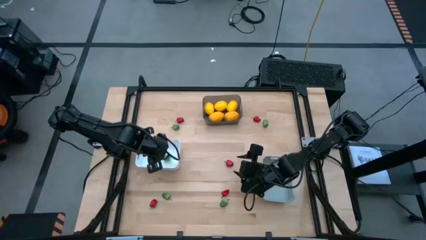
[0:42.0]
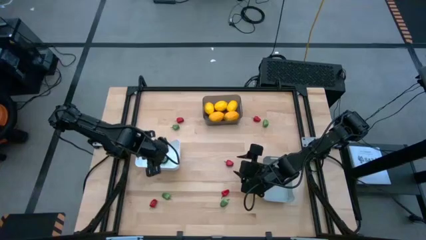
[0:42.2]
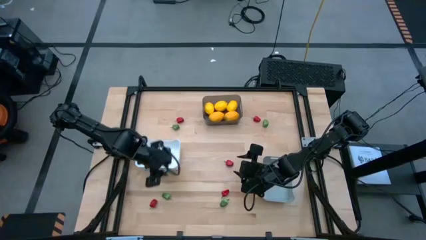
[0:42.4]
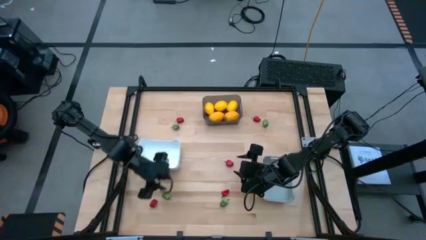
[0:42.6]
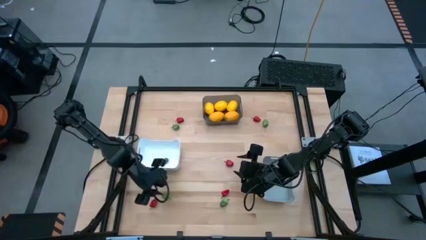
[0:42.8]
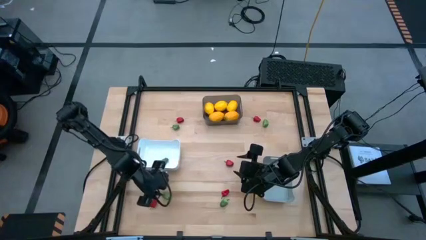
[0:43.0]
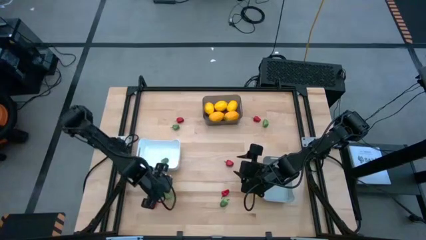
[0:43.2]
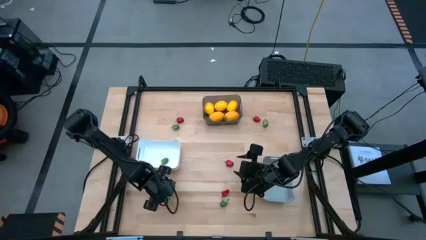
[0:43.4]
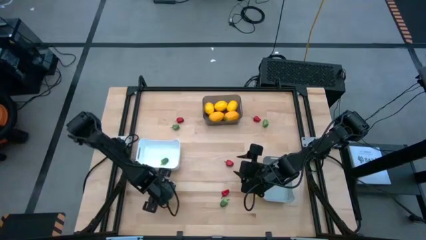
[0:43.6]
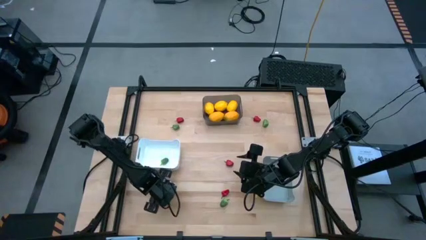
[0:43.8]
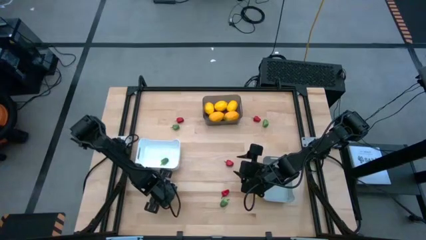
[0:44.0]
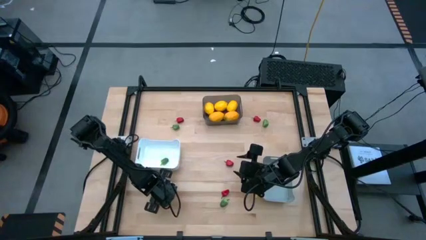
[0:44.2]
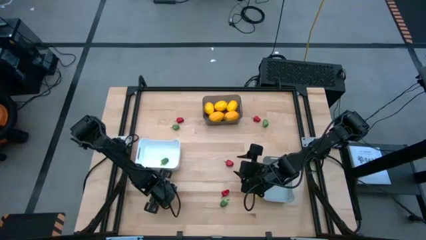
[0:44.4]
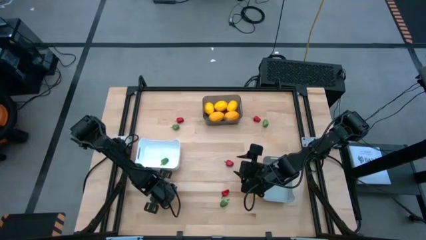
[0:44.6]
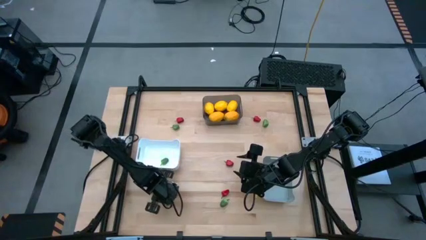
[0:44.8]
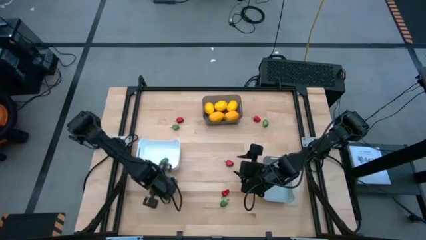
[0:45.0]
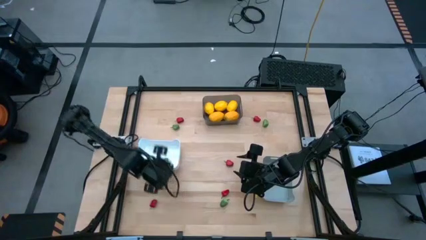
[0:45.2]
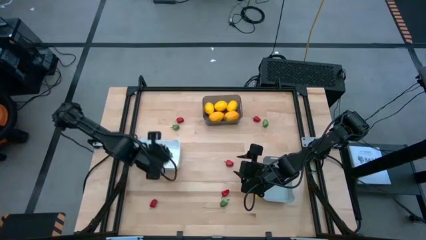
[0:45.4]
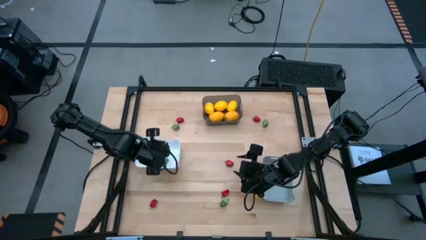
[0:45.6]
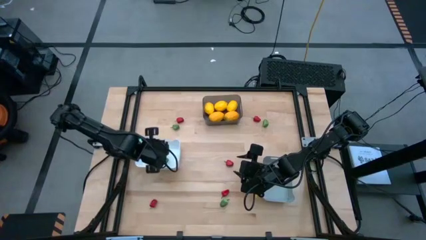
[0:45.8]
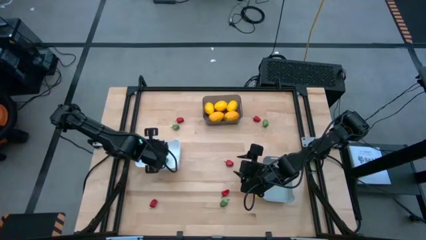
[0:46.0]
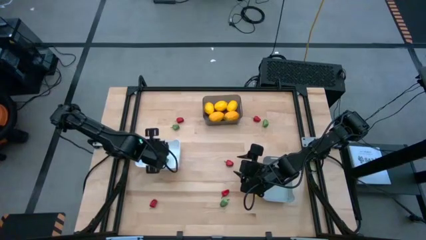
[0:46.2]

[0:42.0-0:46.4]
Task: Sort produce into baskets
Put the green bell pepper into the white bin

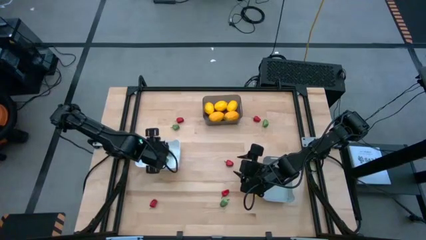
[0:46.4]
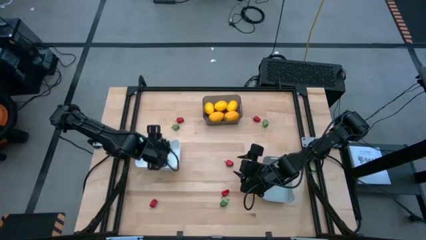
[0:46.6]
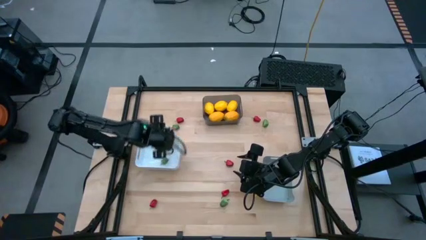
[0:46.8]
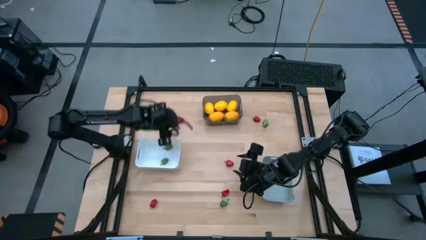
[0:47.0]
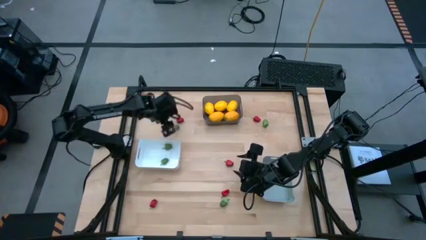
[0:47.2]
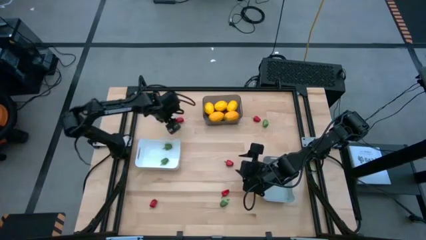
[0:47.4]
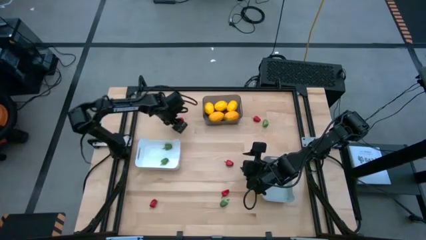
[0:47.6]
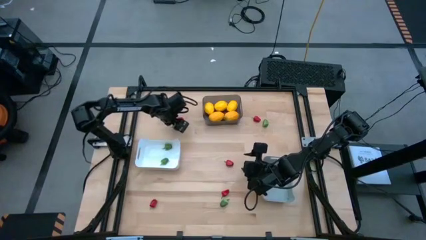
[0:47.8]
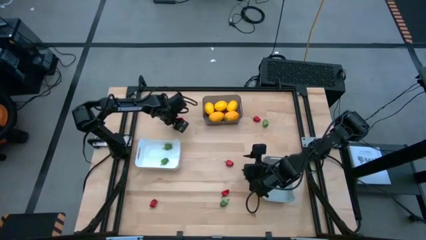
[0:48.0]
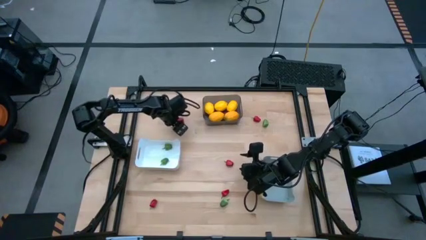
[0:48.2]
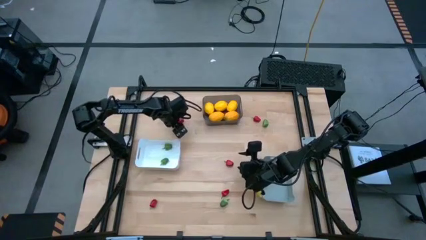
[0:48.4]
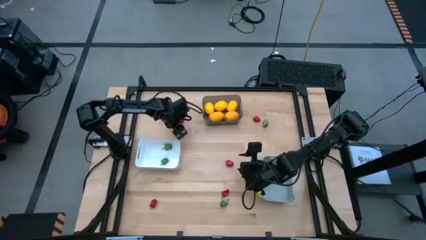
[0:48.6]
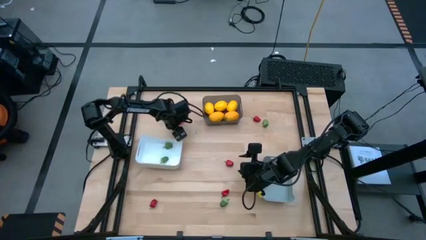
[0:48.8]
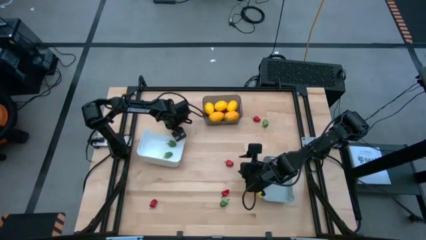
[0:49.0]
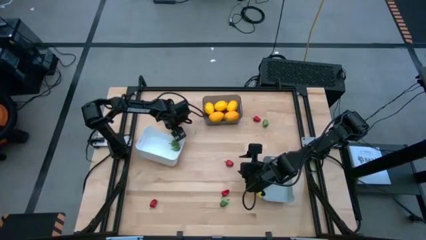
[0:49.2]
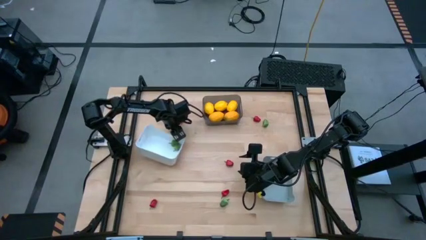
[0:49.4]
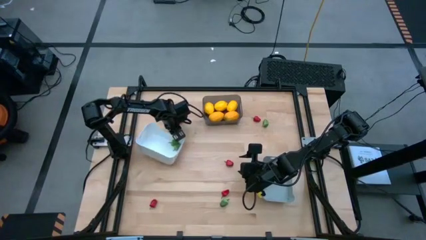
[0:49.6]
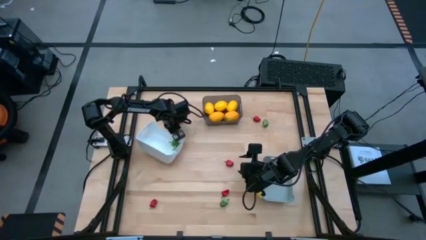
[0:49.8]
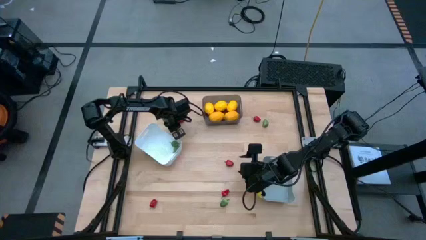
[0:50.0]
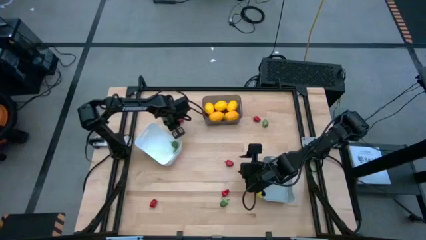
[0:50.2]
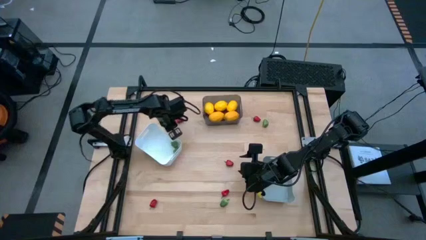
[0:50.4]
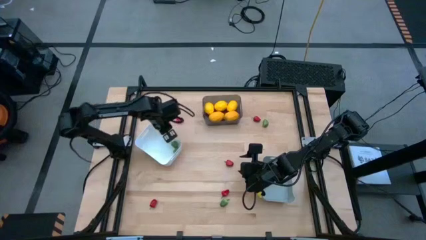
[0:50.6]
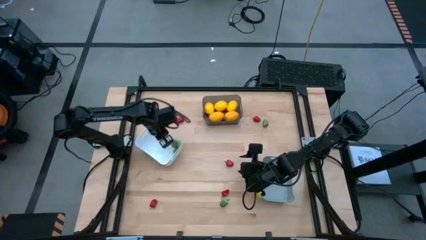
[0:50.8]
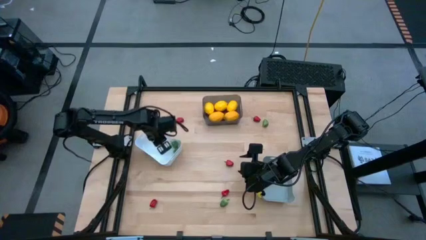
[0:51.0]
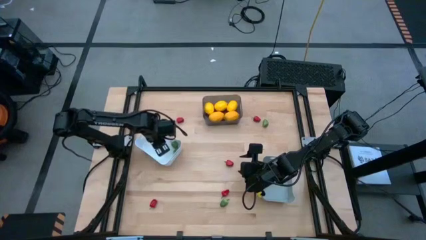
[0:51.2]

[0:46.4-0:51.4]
Put the green bell pepper into the white bin

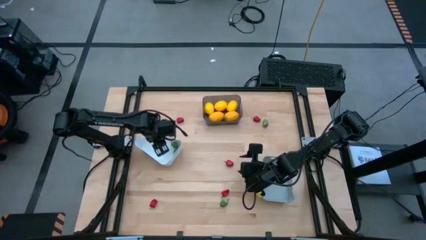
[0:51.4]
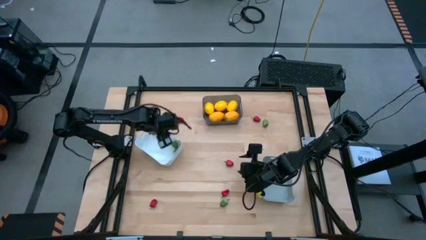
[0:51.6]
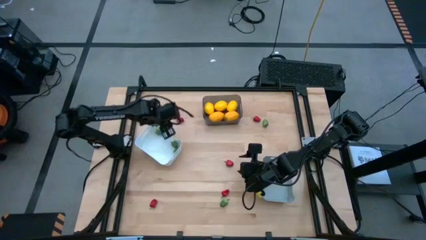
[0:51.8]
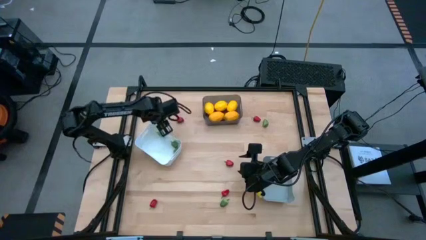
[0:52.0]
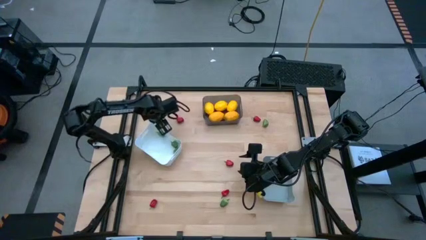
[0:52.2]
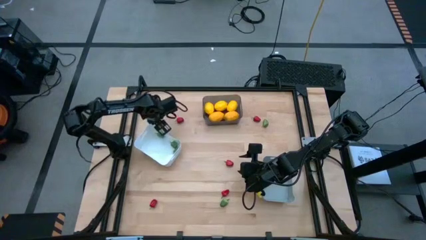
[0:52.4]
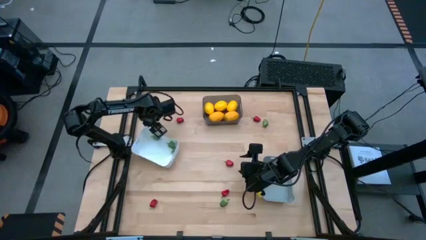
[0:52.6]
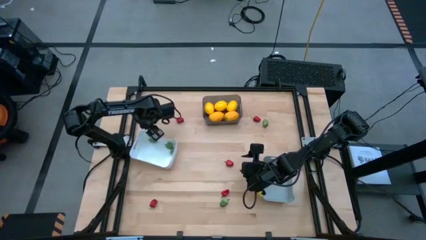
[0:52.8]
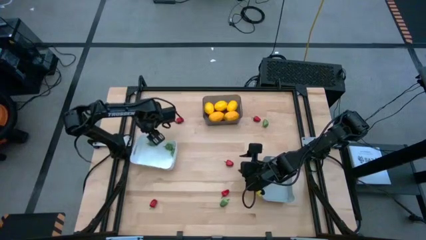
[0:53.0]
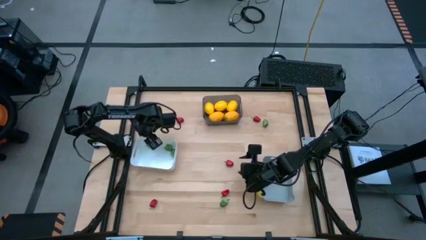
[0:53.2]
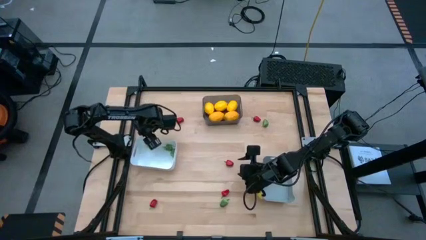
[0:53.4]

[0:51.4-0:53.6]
Adjust the white bin

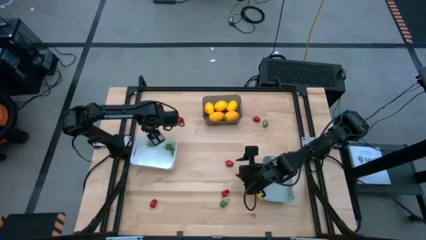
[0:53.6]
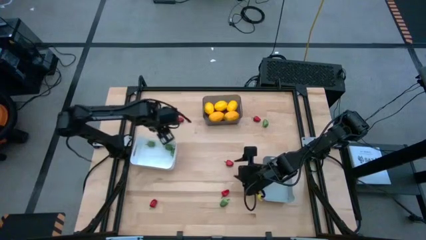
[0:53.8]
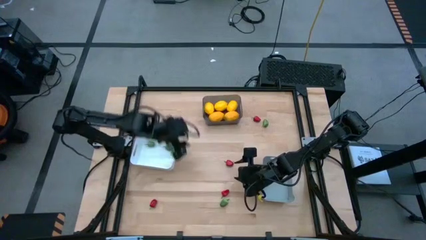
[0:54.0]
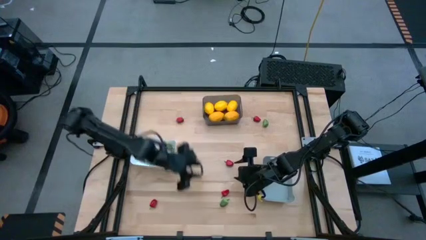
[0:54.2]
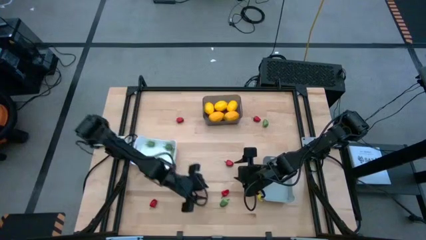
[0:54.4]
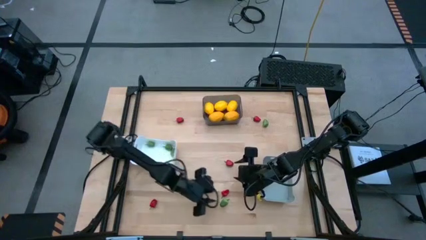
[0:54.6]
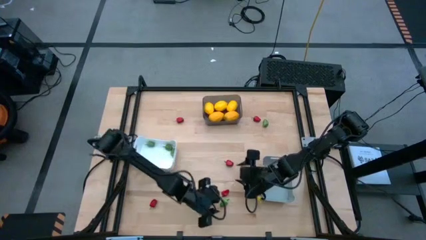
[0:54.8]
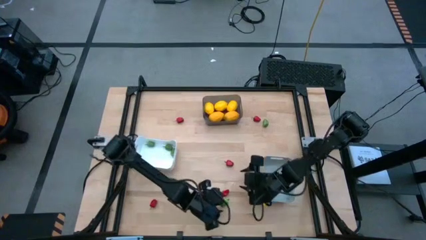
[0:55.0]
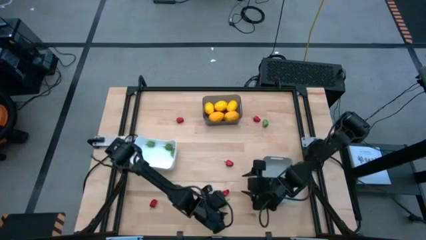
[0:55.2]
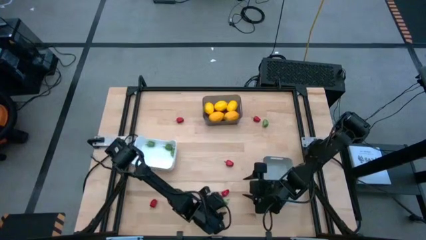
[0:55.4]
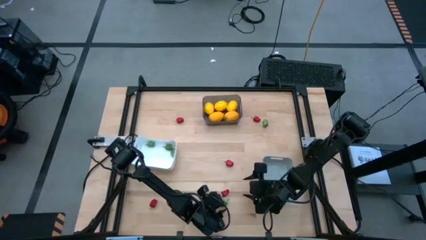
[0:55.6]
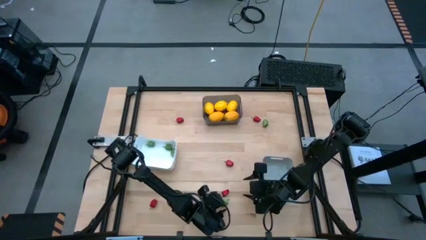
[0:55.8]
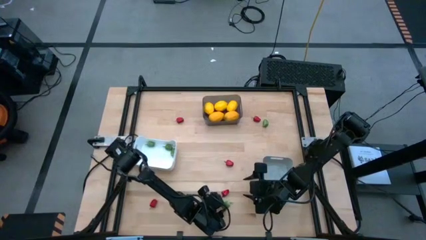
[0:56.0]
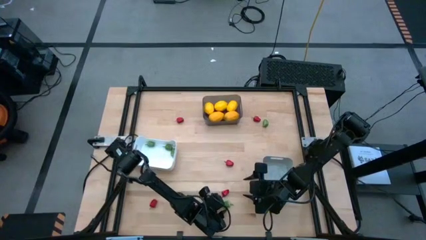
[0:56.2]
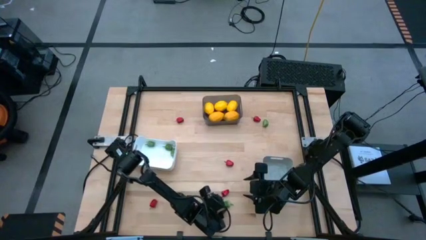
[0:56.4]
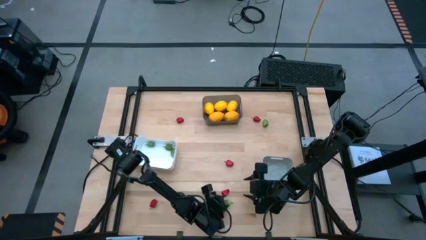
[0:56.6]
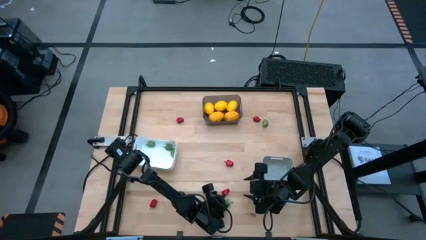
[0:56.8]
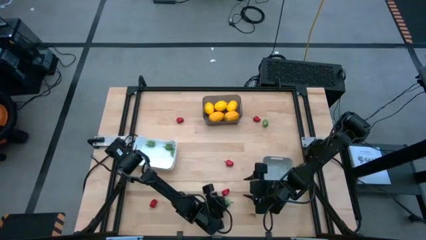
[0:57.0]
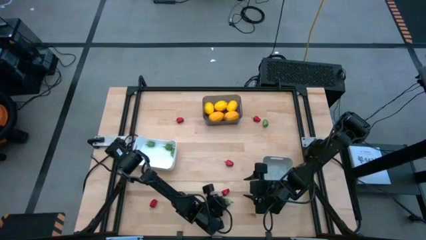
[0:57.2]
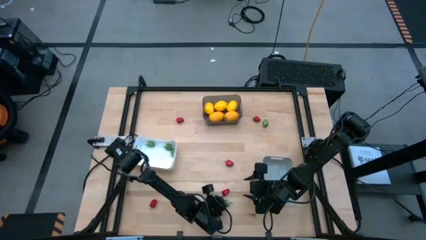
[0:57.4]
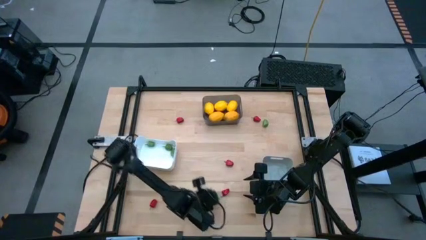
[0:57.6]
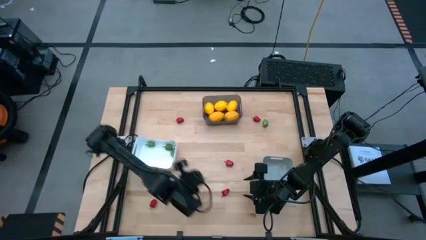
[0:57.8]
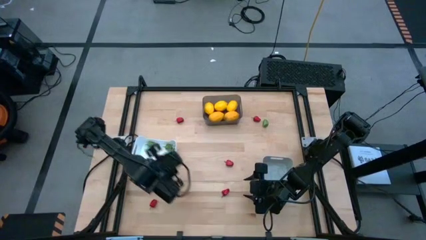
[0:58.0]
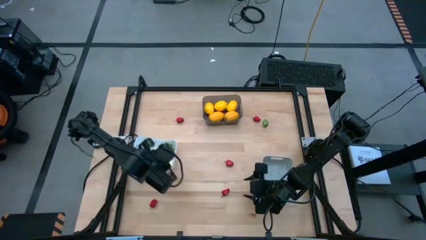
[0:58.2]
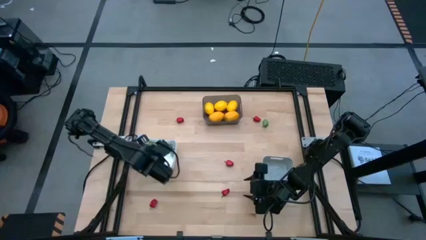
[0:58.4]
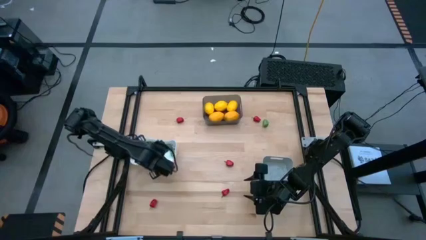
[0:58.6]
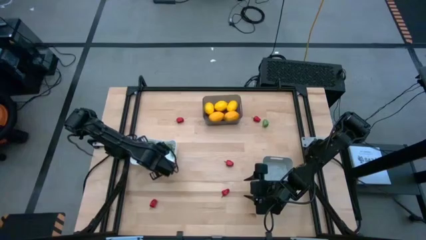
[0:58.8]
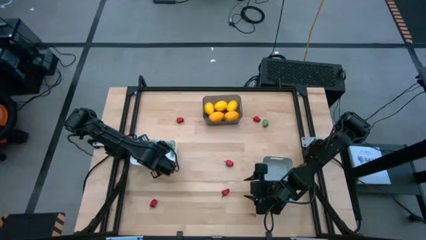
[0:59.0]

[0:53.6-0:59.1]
Put the green bell pepper into the white bin
